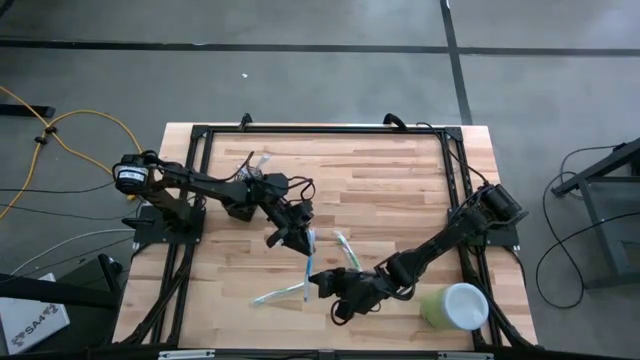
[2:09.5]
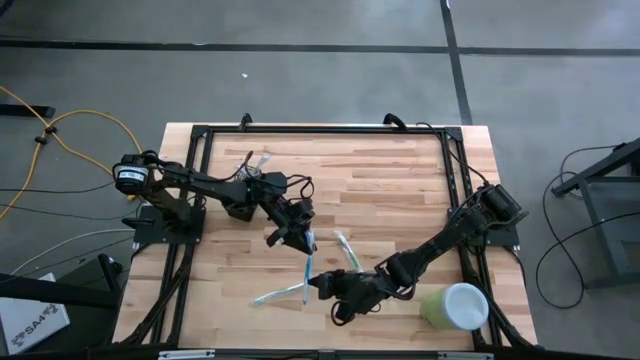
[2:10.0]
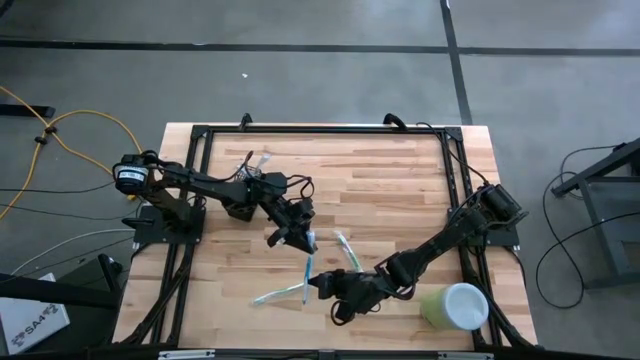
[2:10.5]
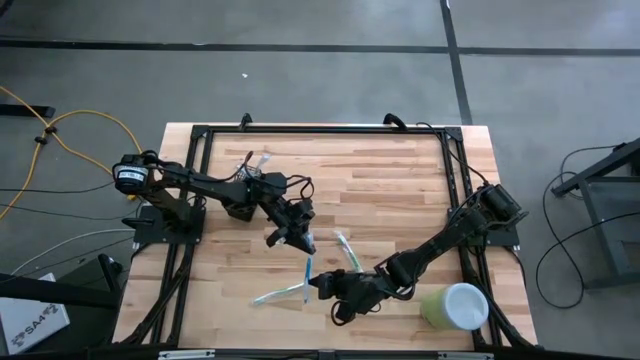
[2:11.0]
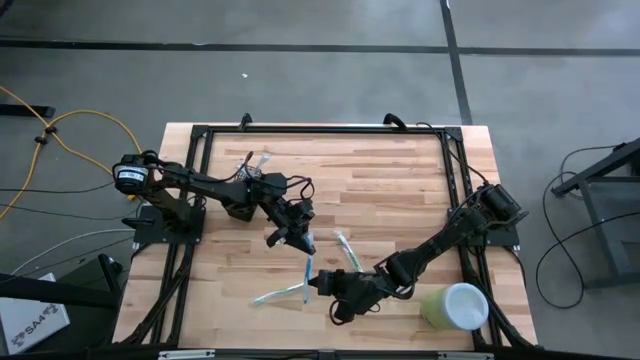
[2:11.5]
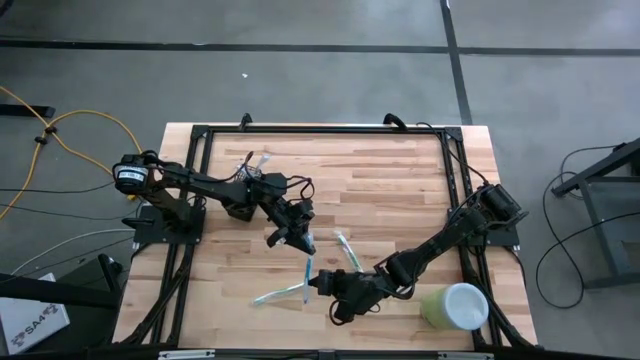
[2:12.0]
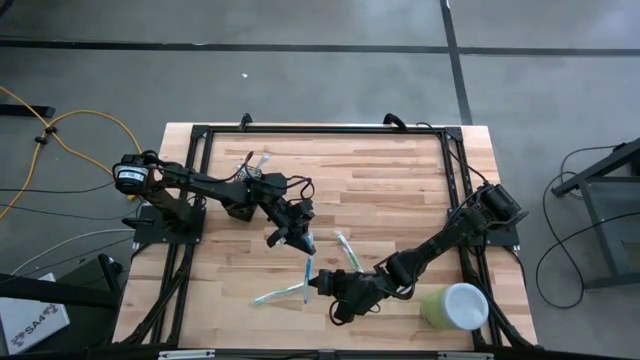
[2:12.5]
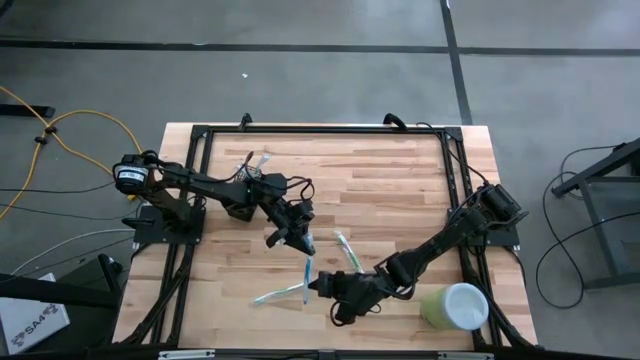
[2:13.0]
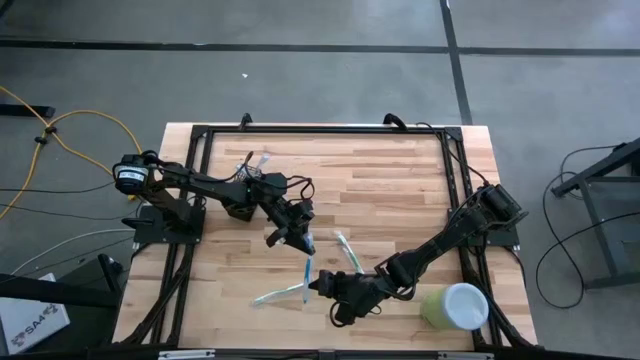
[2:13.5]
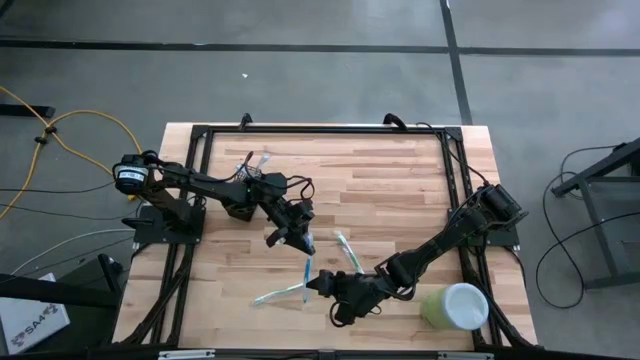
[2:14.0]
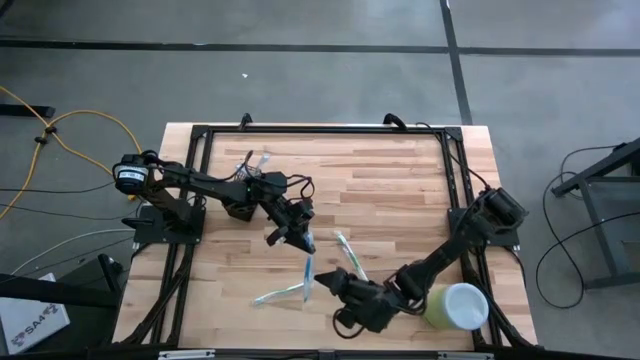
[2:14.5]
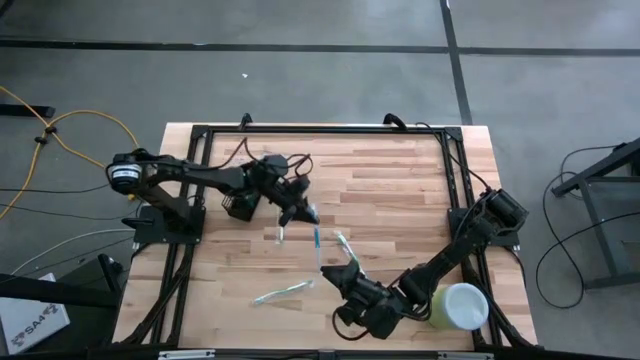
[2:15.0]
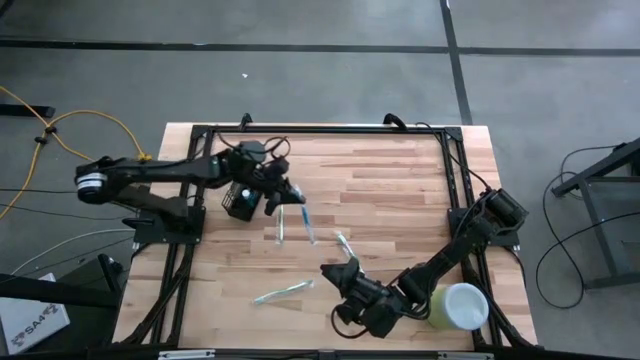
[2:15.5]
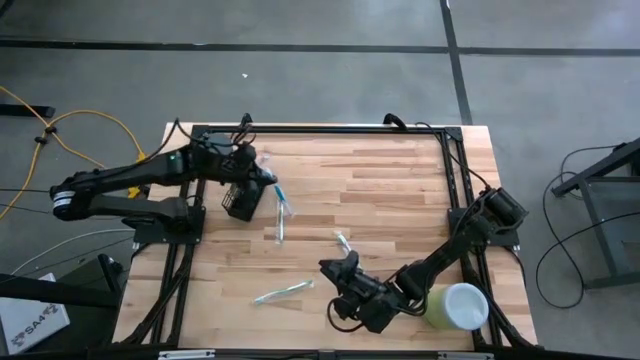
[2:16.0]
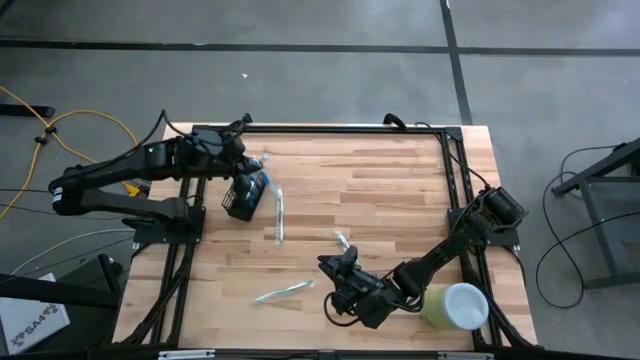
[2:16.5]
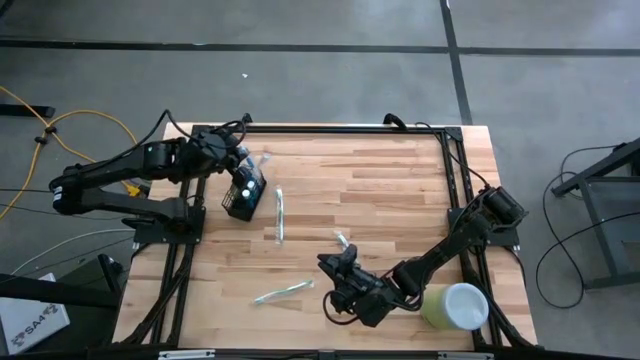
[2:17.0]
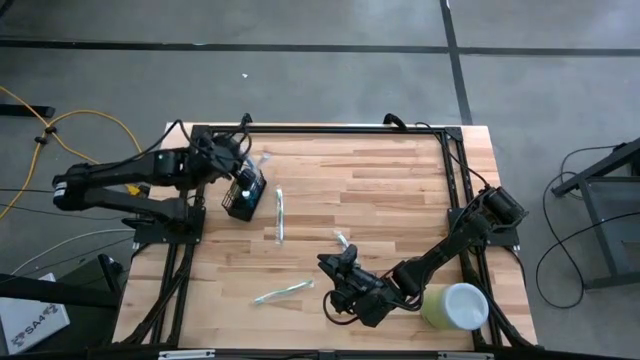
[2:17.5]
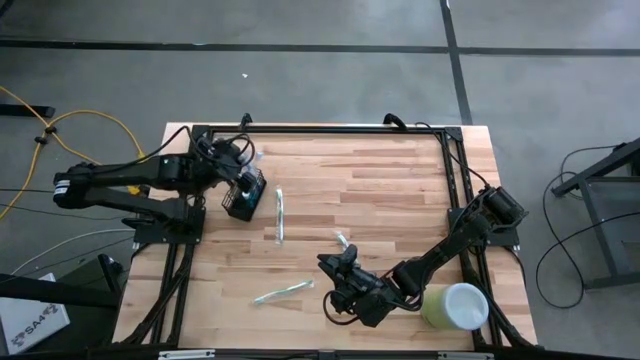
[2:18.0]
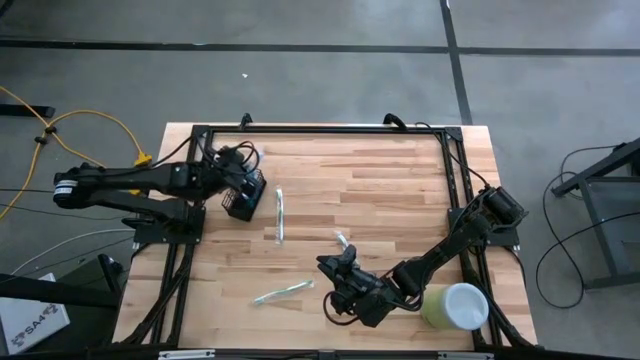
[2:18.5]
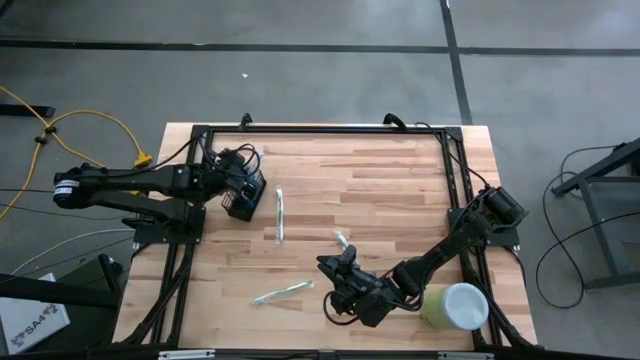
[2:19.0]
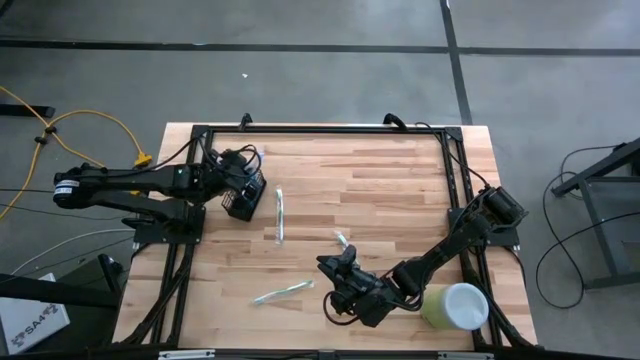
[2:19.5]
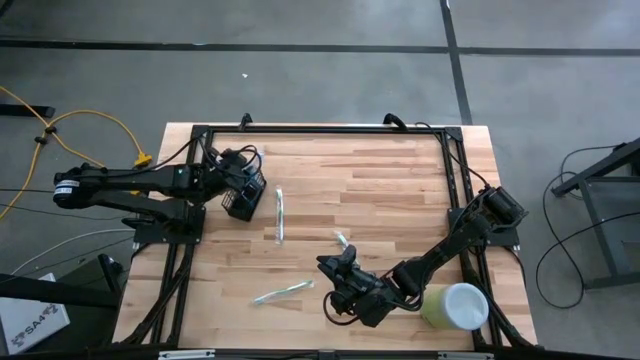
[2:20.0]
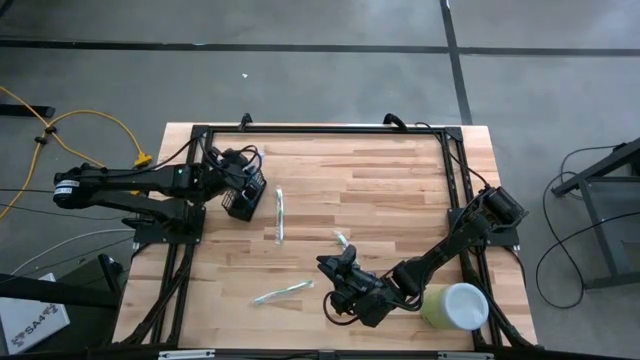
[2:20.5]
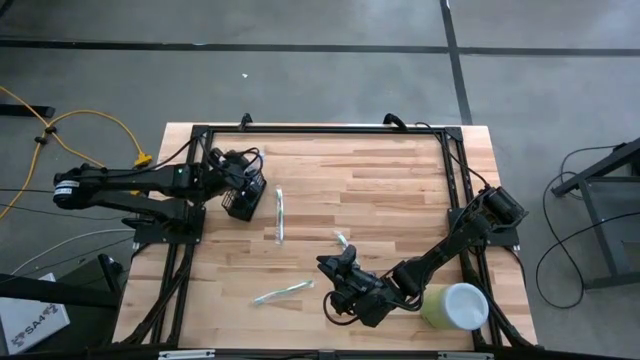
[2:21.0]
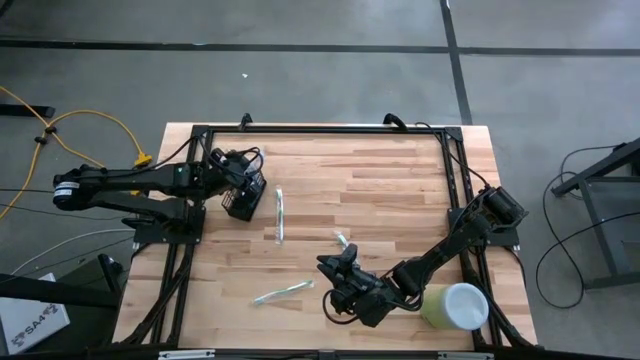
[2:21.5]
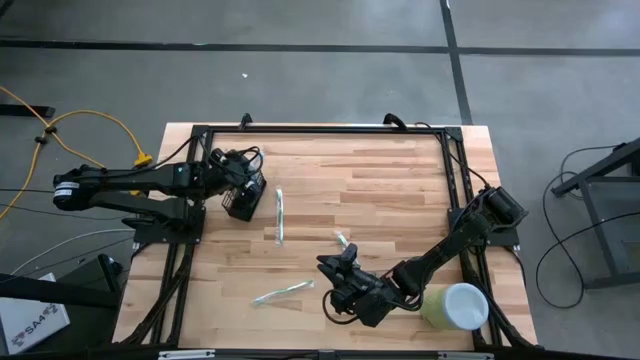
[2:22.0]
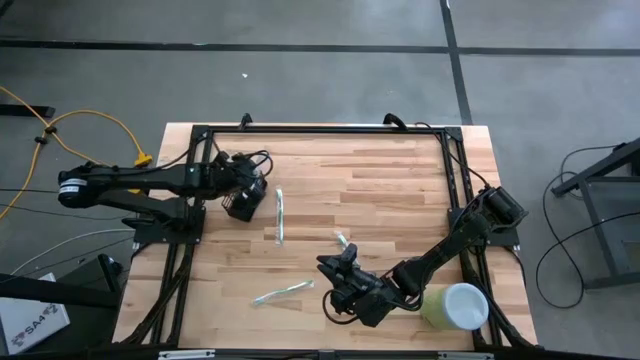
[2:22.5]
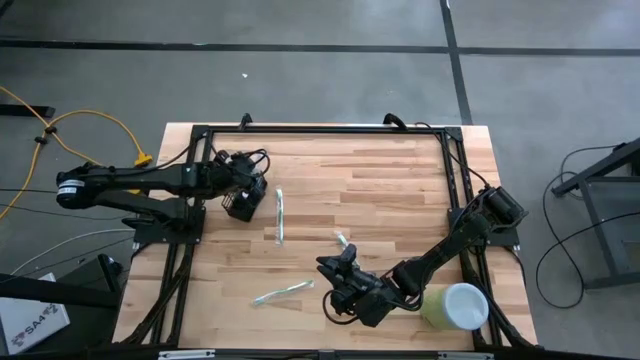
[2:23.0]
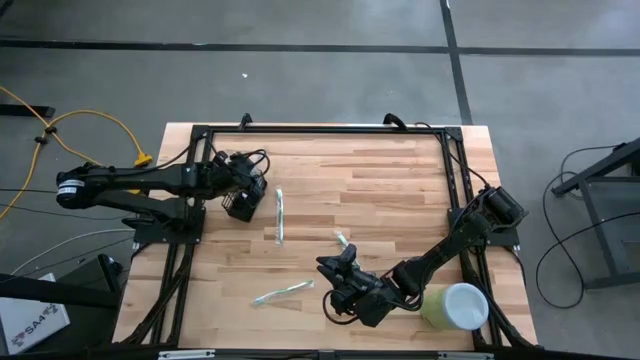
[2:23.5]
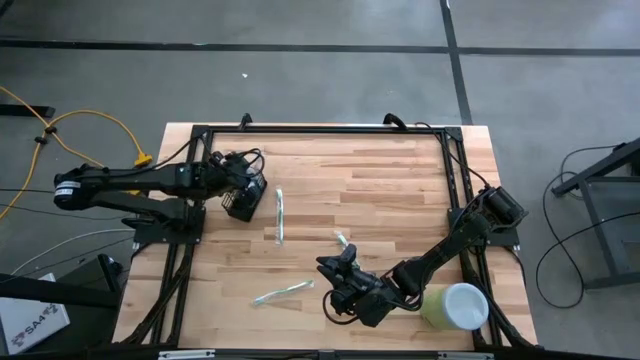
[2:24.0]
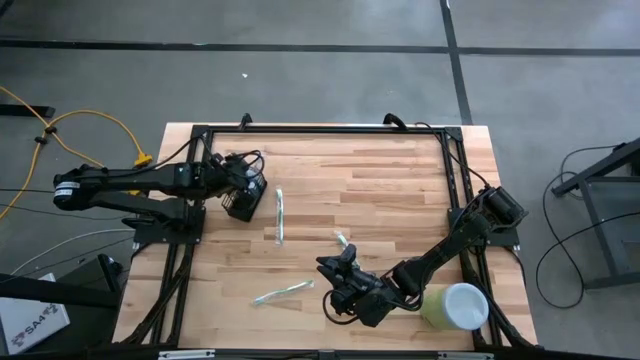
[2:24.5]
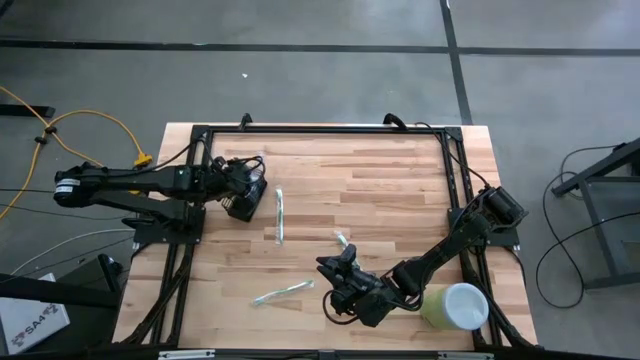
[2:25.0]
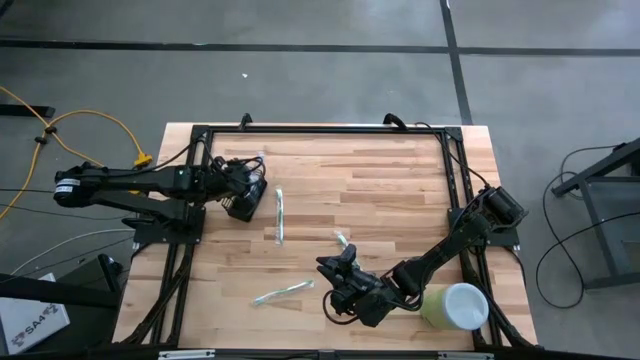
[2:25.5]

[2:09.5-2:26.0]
Task: Pick & Place toothbrushing station
Put the blue toothbrush into the black wire organizer

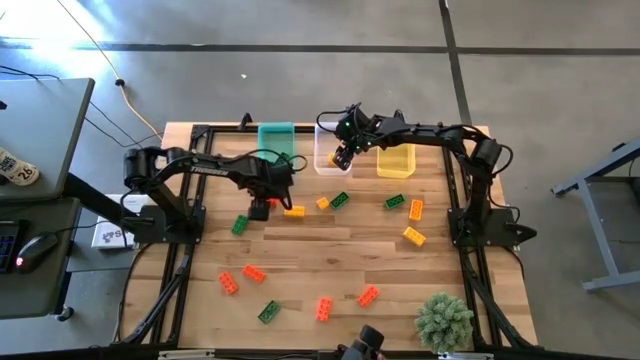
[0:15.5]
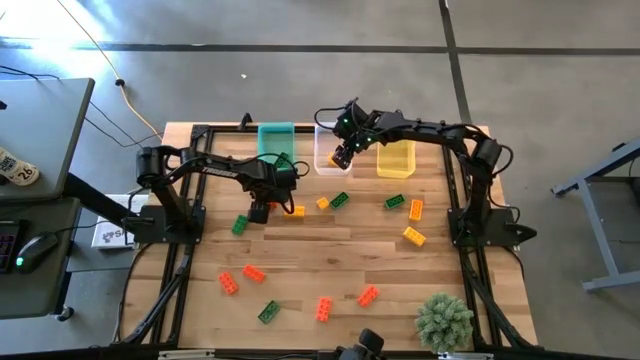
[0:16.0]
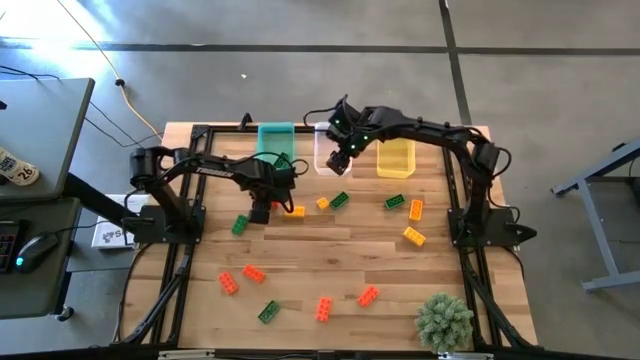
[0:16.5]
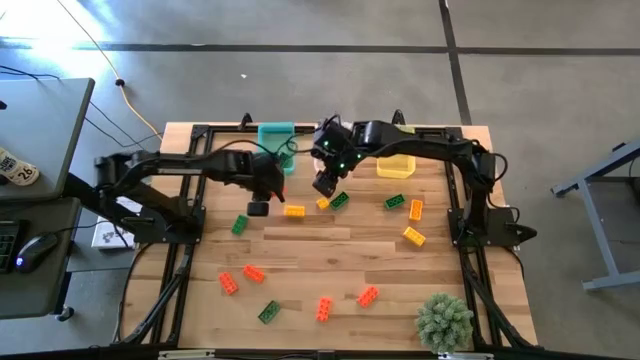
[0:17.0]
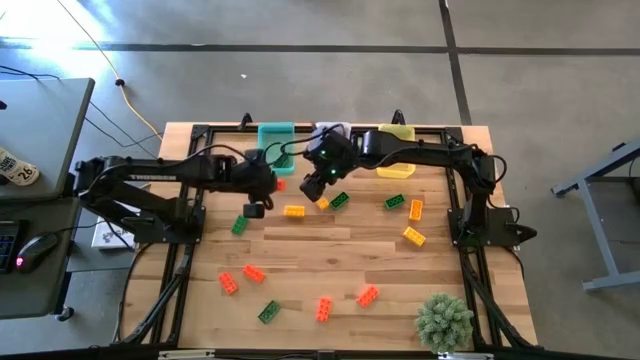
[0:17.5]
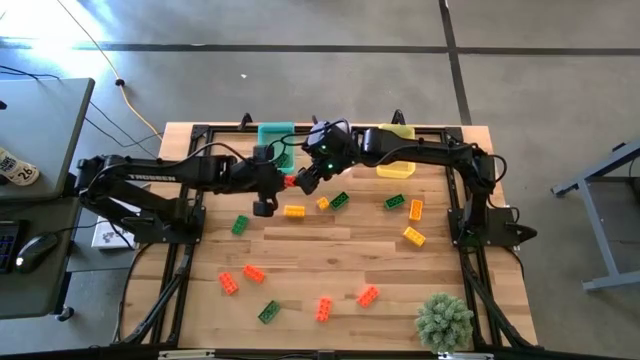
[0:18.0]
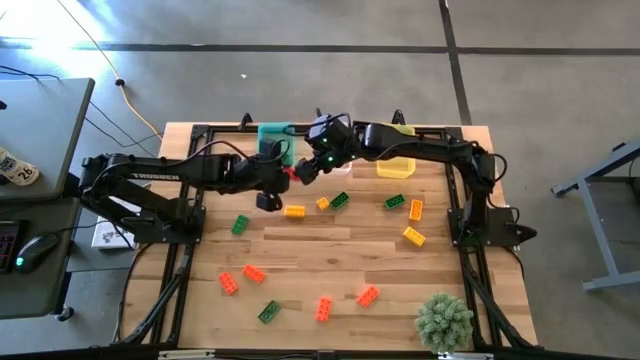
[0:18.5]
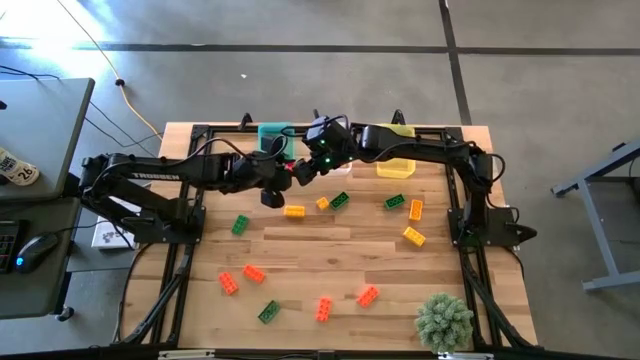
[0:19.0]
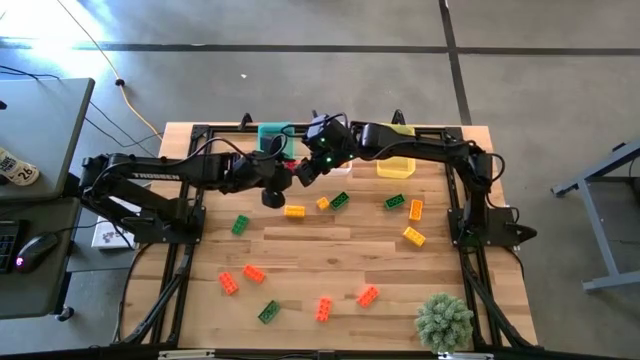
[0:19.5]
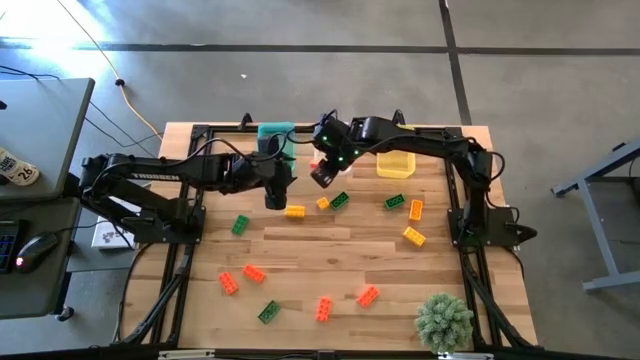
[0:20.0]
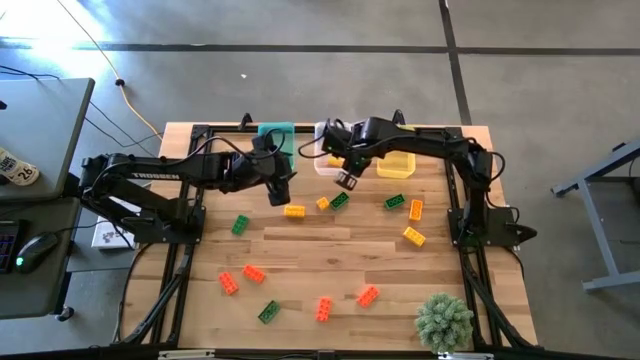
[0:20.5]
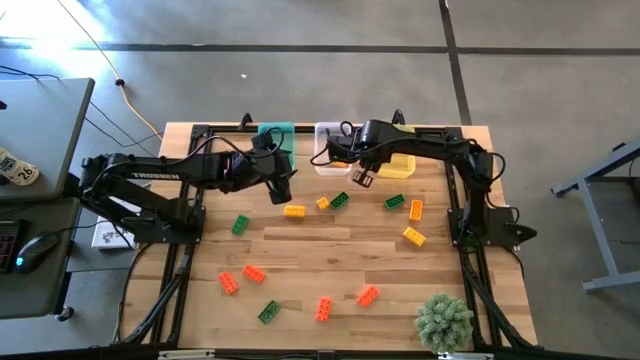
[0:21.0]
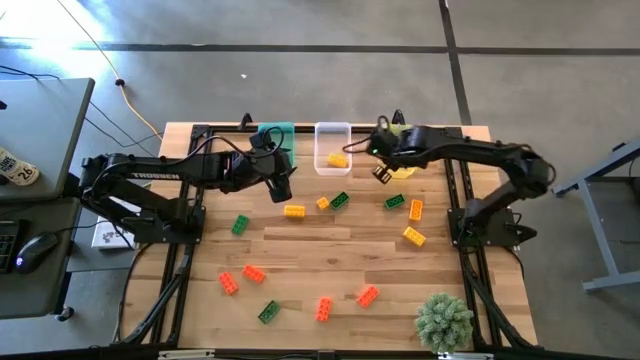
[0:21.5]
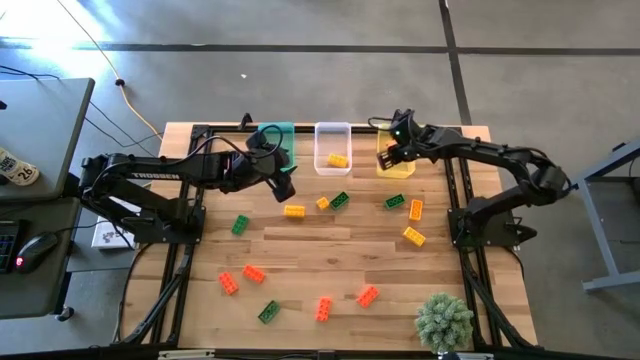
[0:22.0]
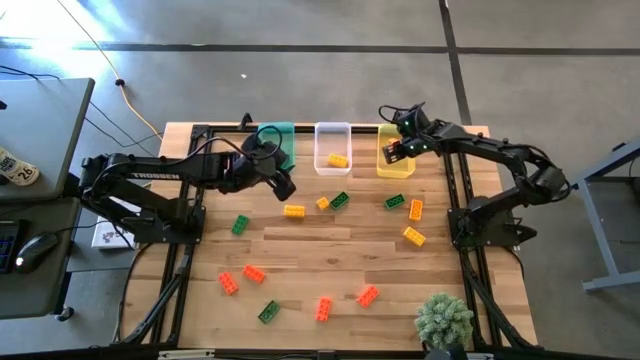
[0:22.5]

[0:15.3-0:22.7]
Task: Sort & place blocks by color
Put the orange game piece into the yellow bin
